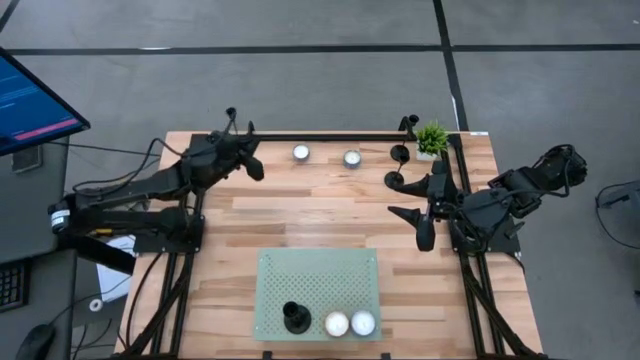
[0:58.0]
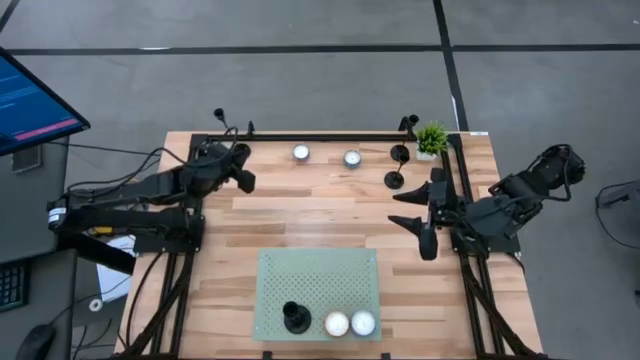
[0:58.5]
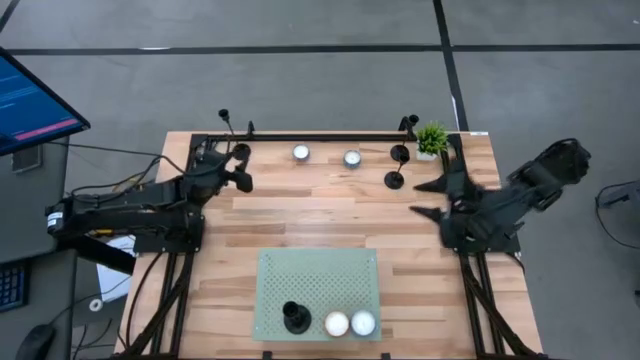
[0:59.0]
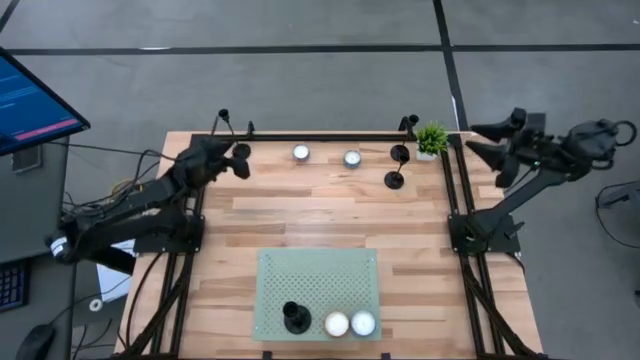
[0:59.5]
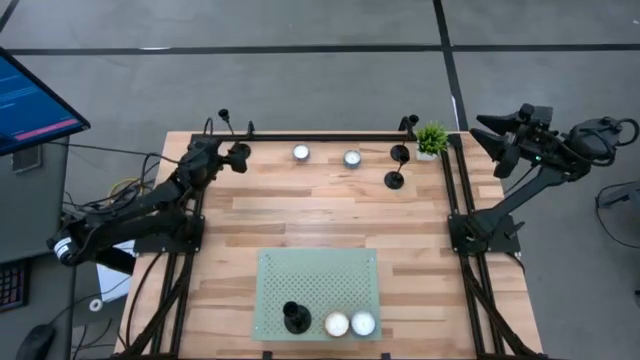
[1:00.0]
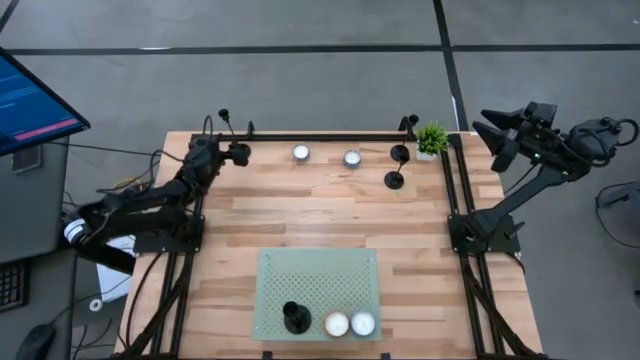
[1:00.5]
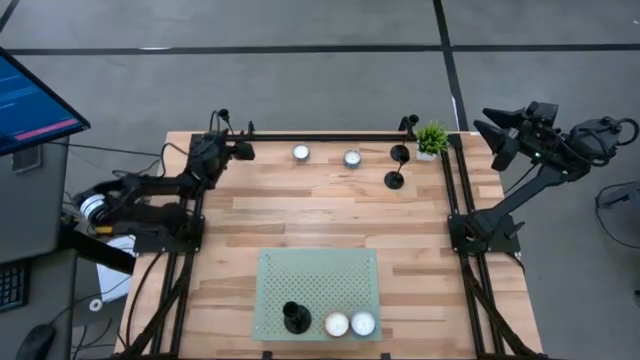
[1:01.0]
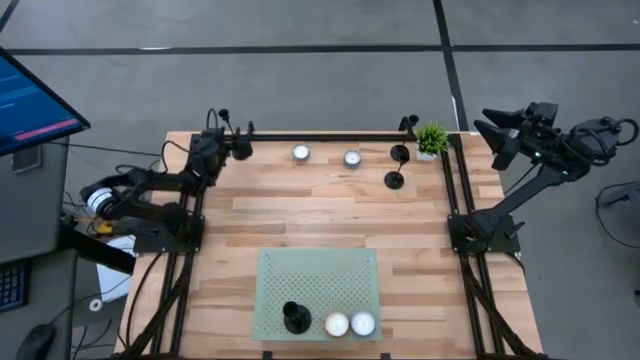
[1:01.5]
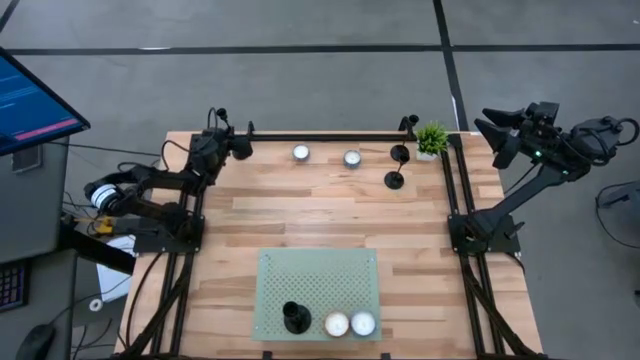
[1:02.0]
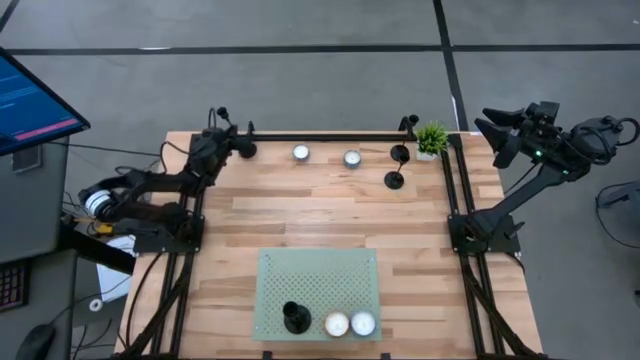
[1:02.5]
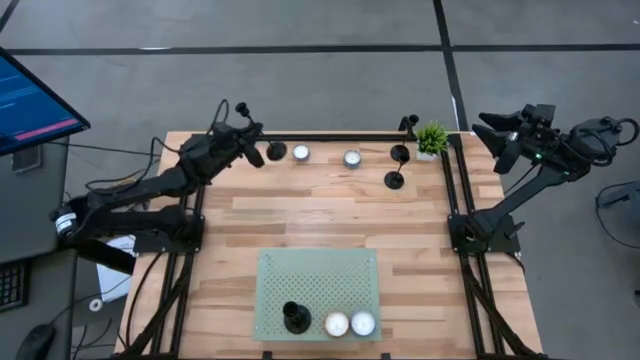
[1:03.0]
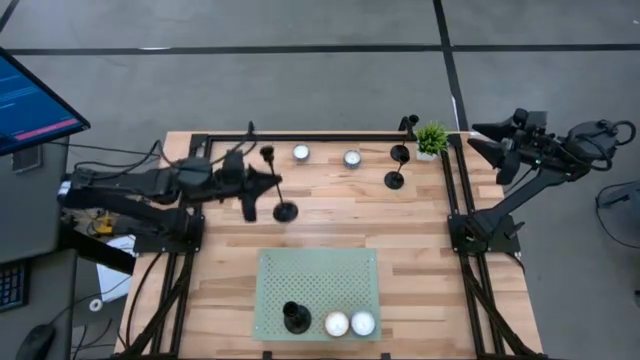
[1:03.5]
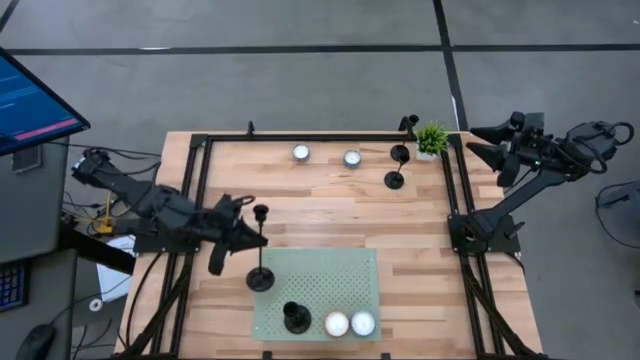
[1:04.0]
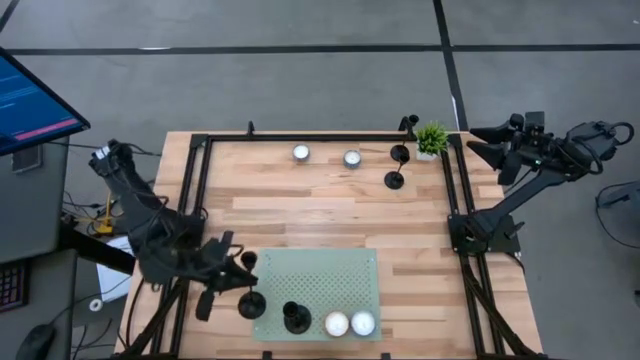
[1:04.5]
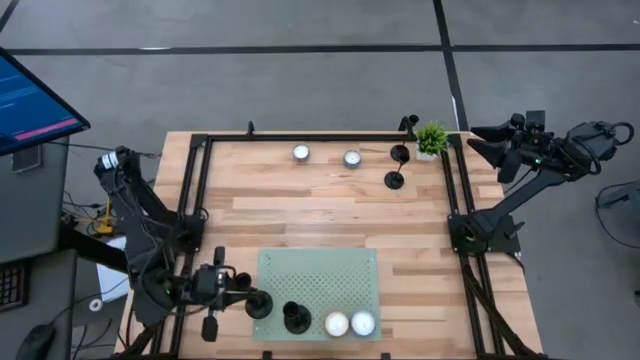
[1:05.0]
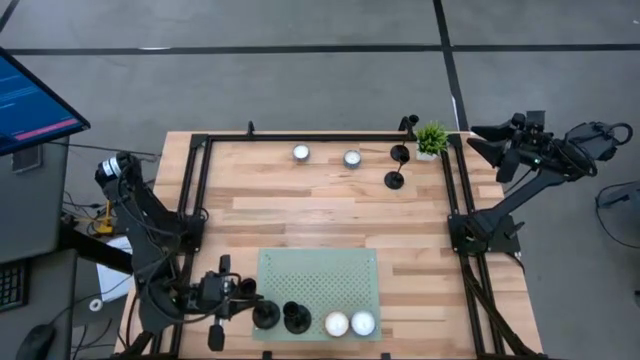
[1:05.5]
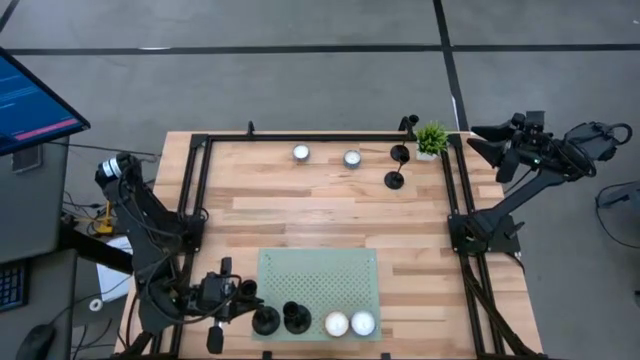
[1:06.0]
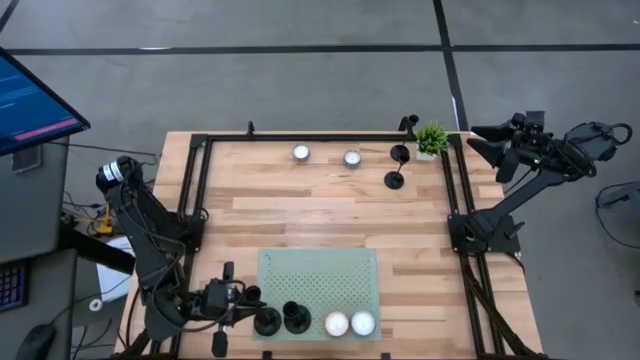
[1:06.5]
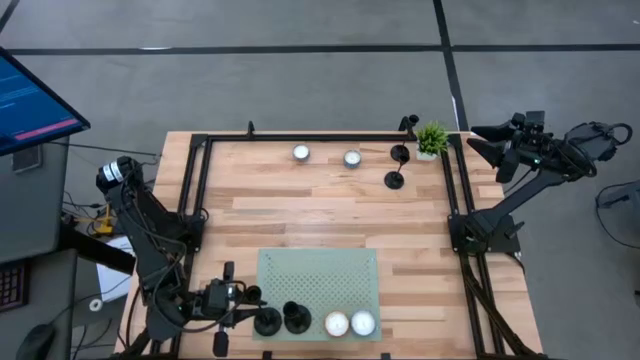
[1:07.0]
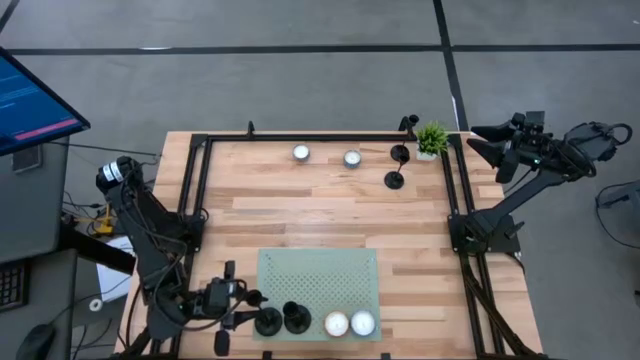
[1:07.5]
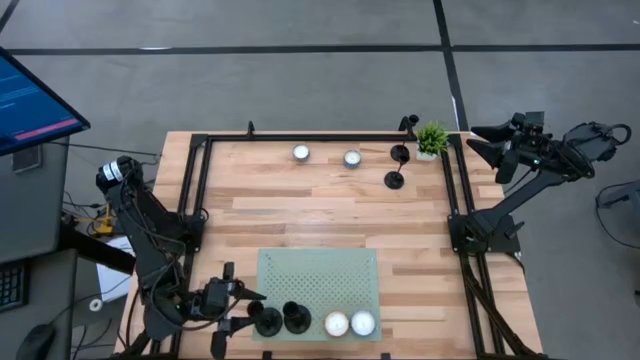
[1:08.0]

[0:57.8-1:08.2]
Task: Stock candles on shelf
Put the black candle holder on the shelf

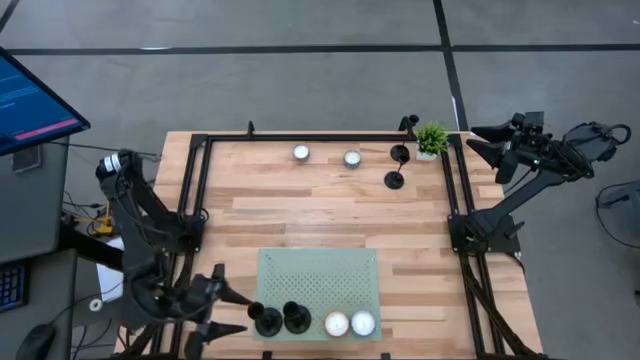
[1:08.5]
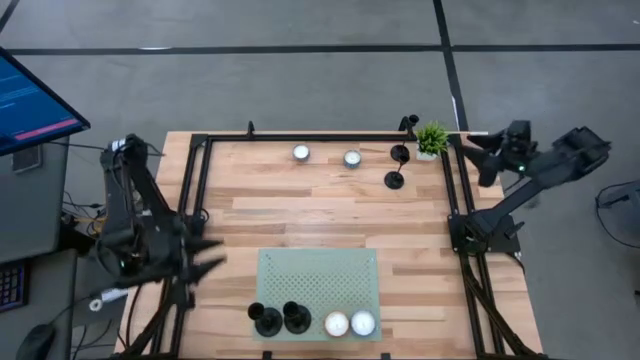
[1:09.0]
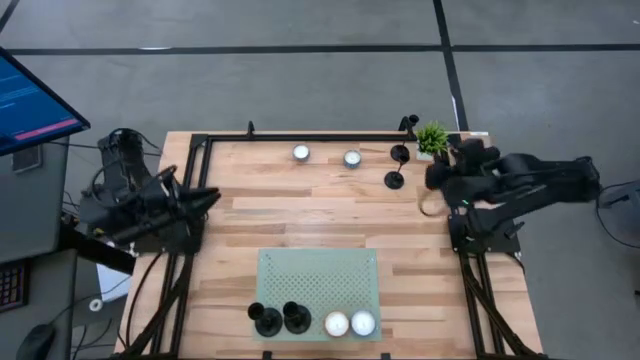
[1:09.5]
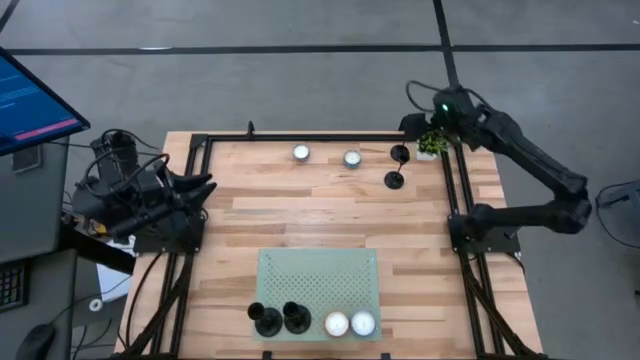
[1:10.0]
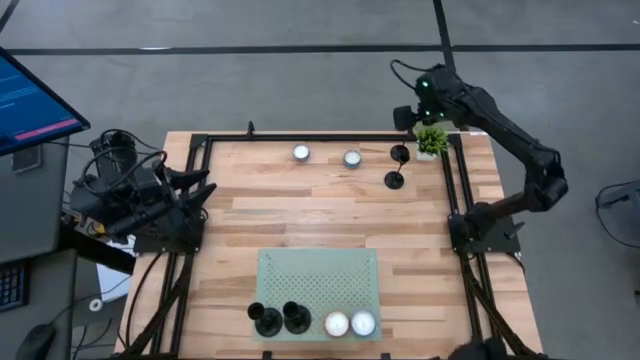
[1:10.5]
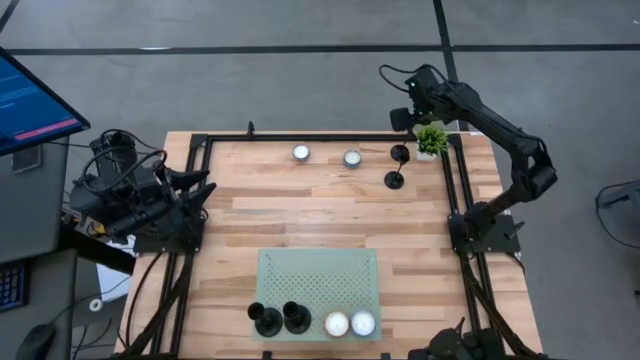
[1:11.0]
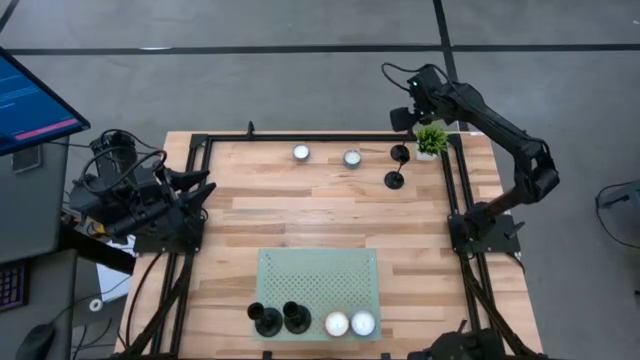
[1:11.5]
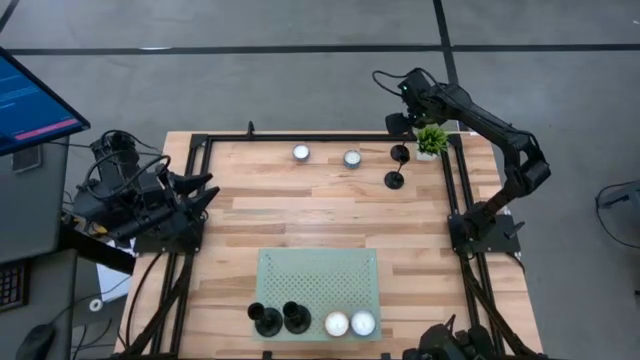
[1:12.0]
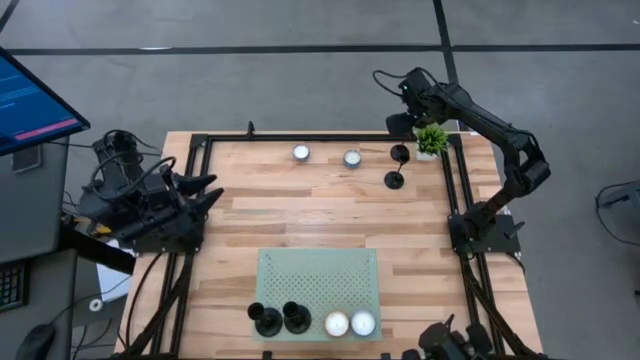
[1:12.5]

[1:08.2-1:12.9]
Put the black candle holder on the shelf

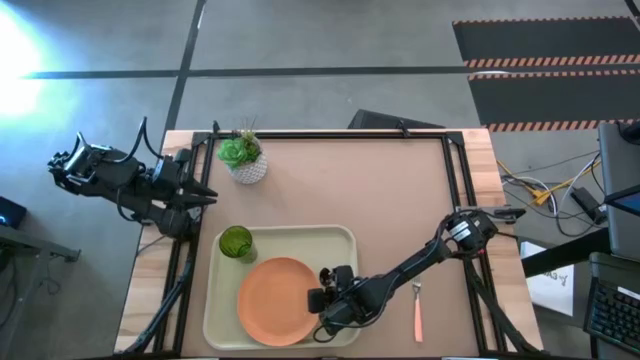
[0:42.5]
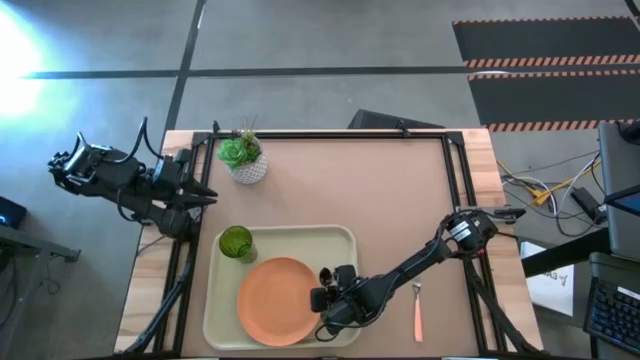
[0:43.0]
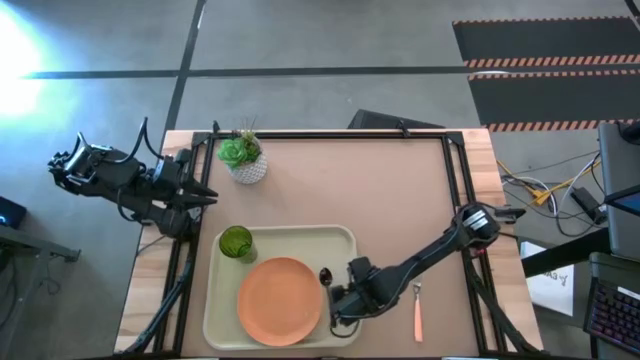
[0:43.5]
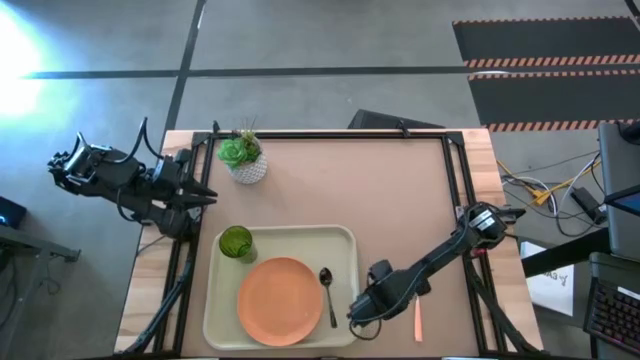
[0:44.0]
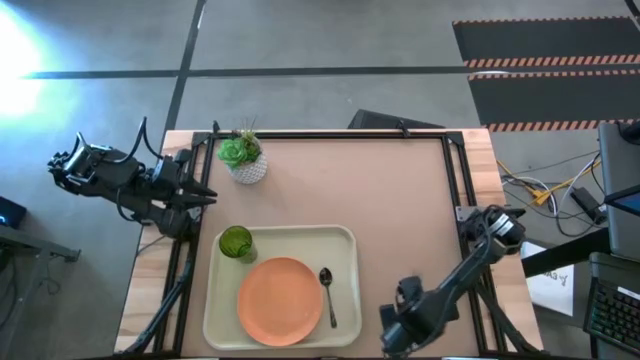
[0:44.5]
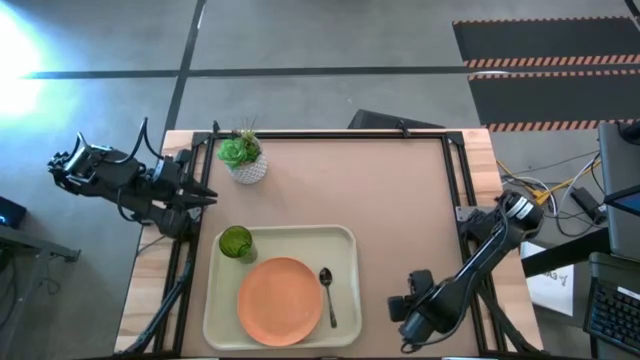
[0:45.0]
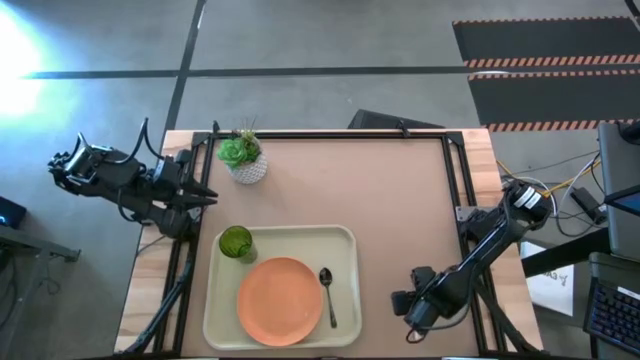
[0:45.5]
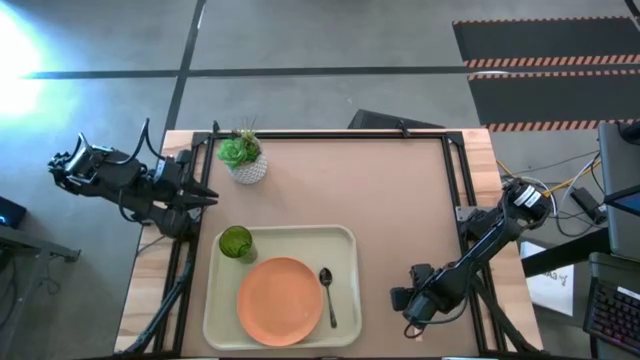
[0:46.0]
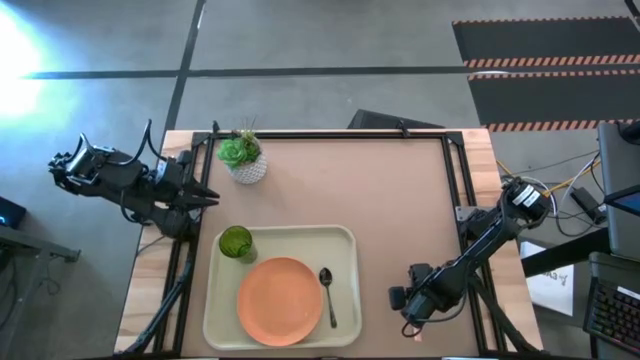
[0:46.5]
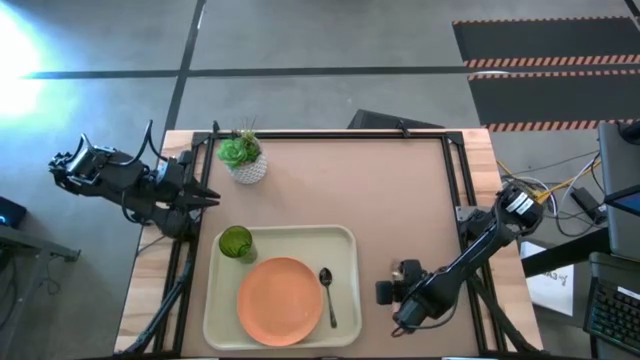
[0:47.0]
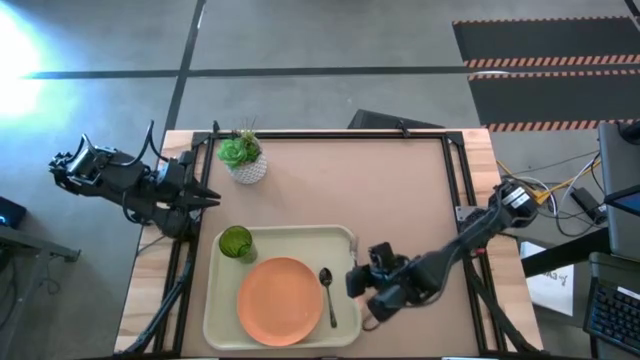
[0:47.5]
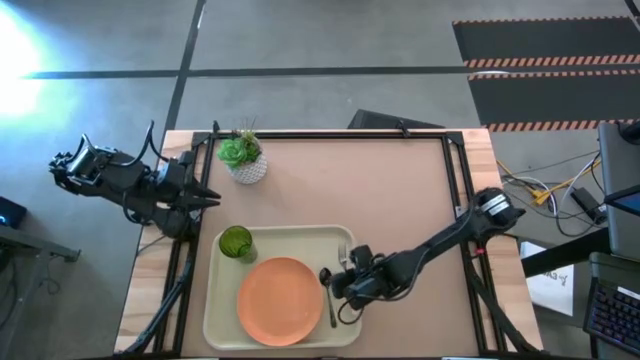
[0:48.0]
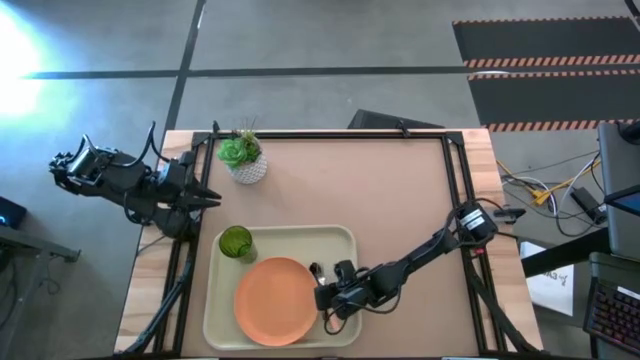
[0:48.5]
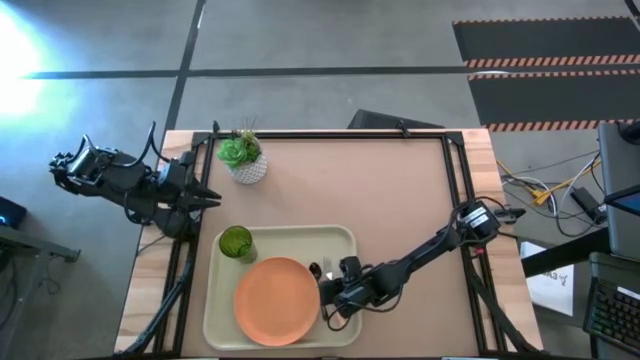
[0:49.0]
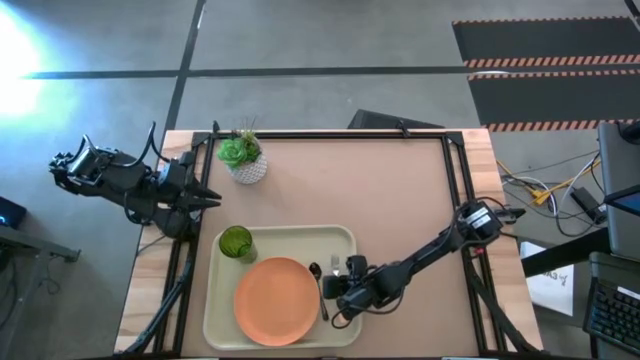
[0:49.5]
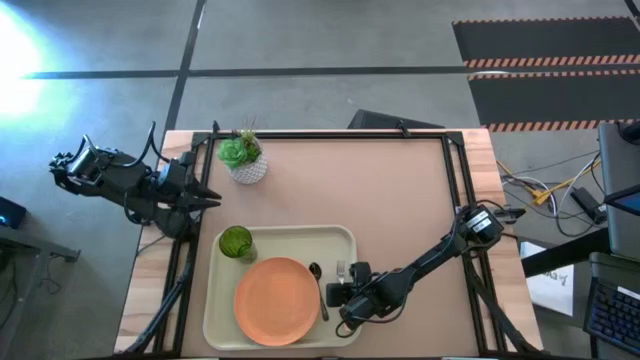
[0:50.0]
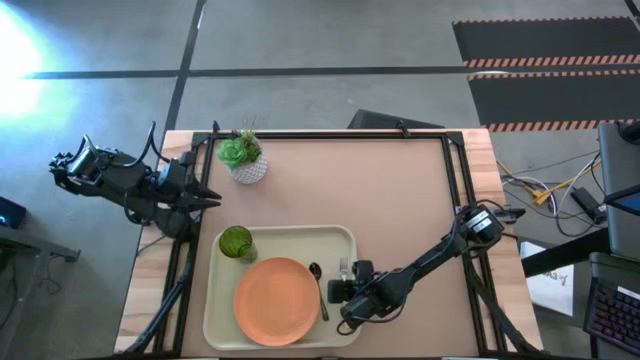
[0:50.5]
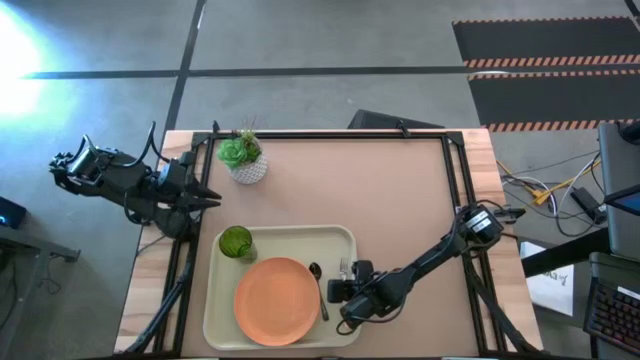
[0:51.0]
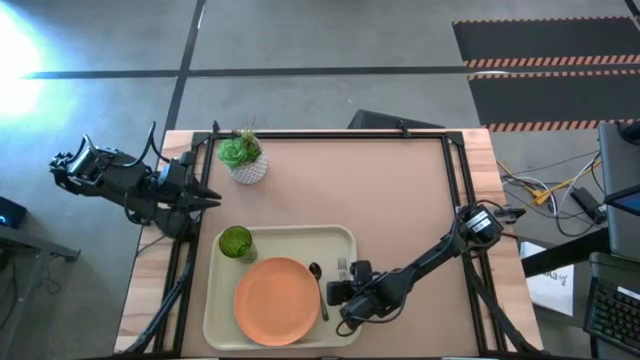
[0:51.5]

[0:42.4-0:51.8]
Task: Pick and place plate/cup/fork/spoon on tray
Put the orange fork on the white tray to the right of the black spoon
